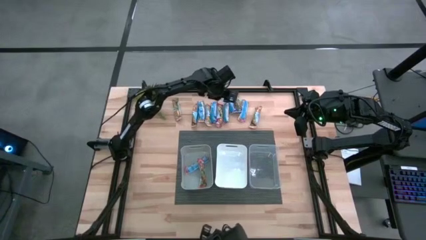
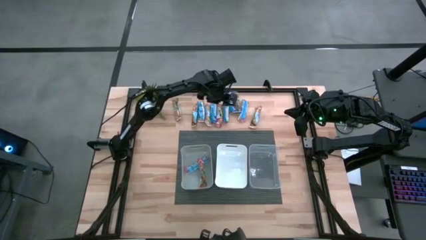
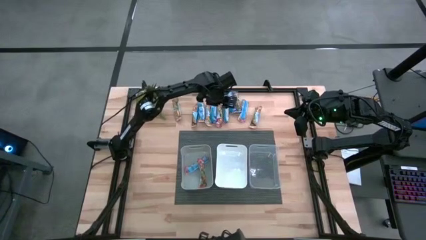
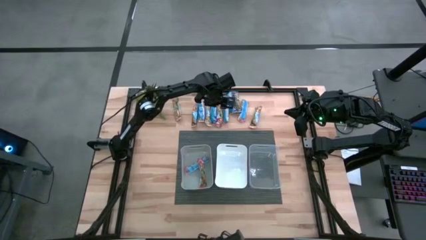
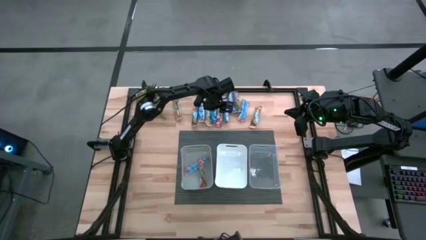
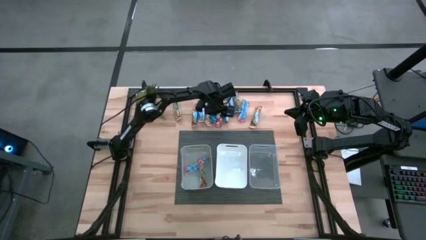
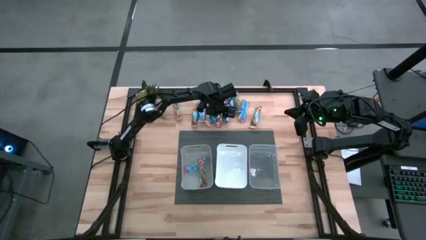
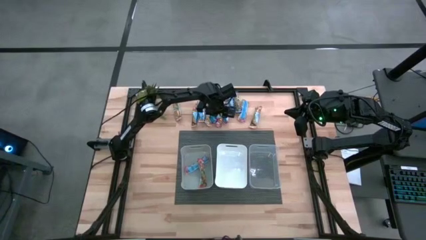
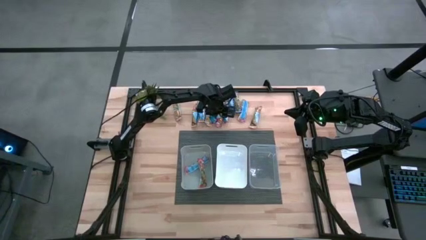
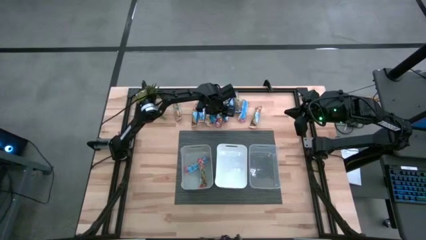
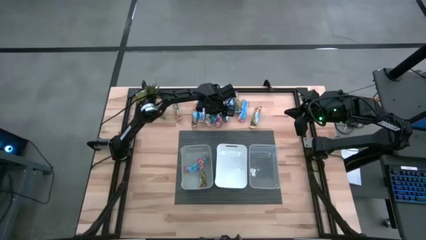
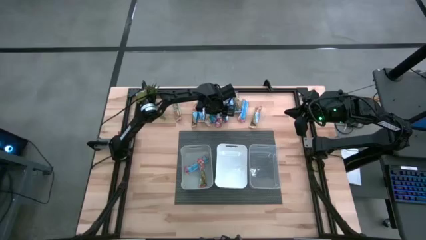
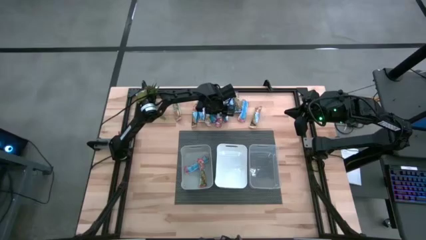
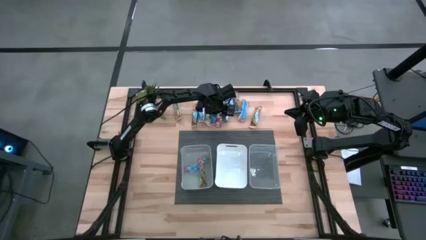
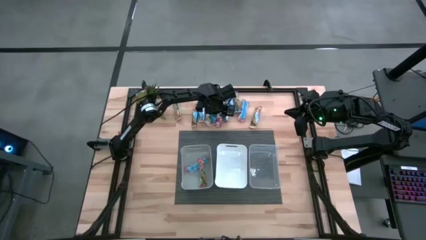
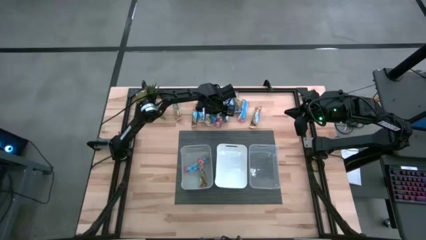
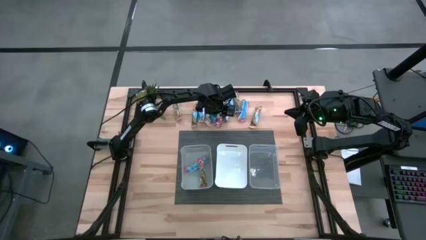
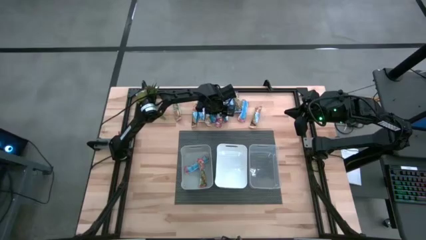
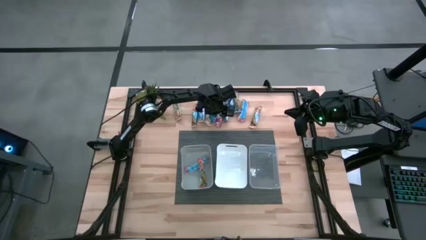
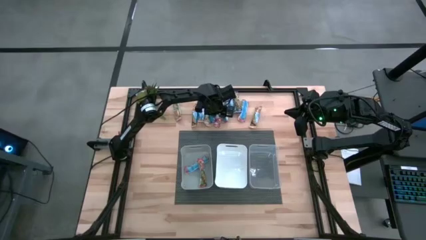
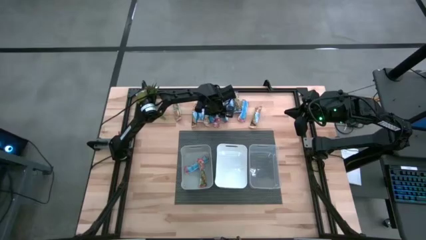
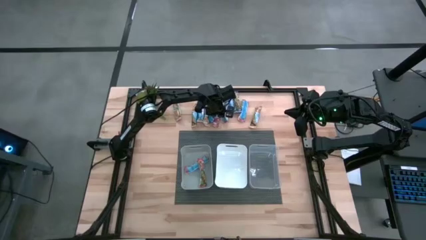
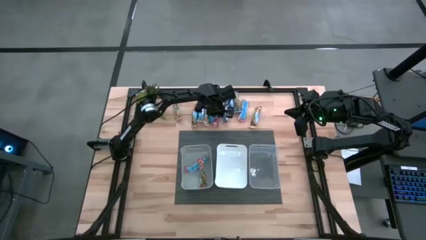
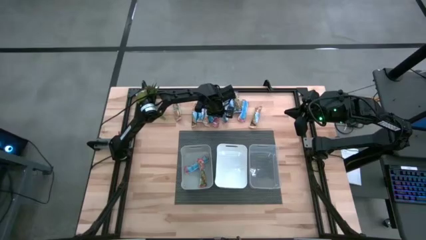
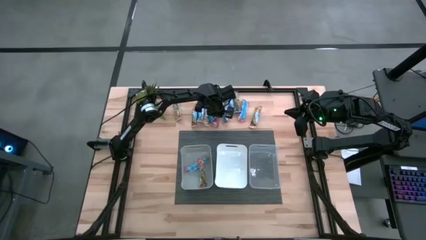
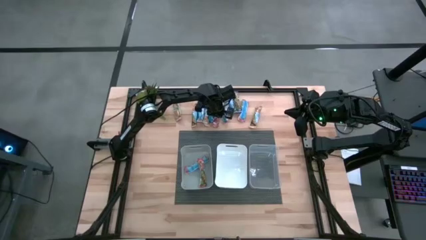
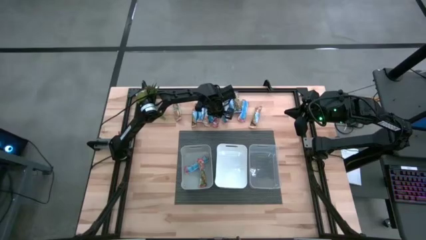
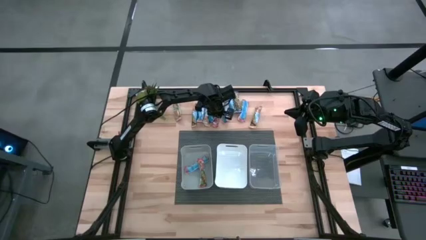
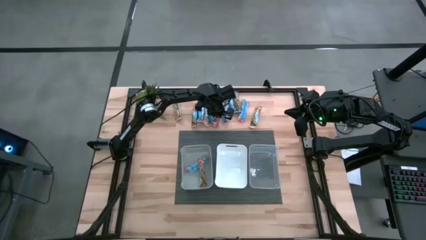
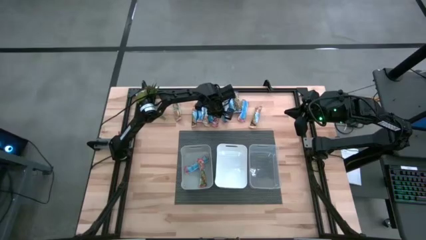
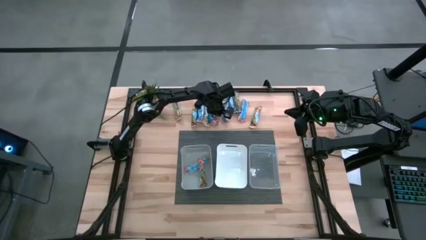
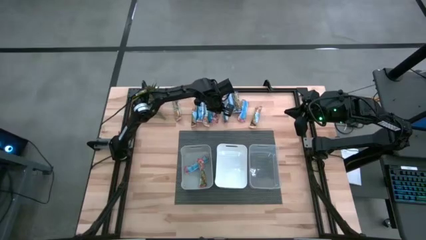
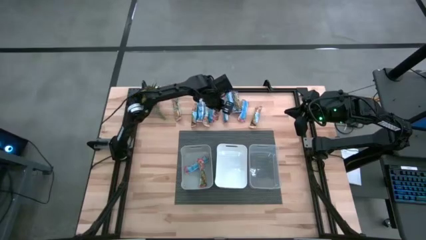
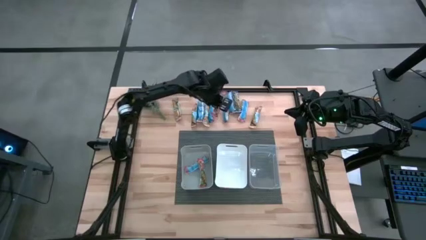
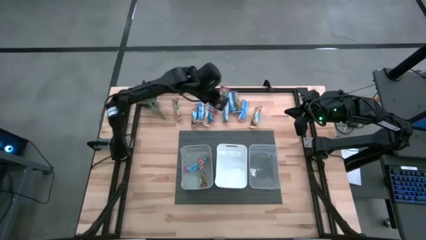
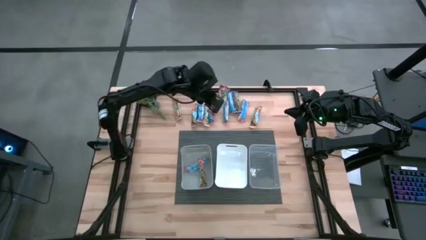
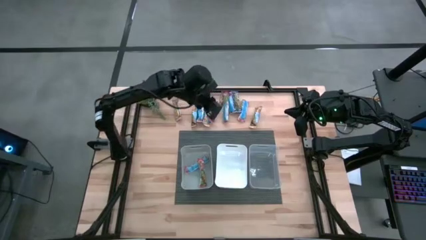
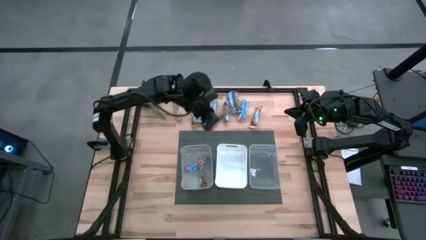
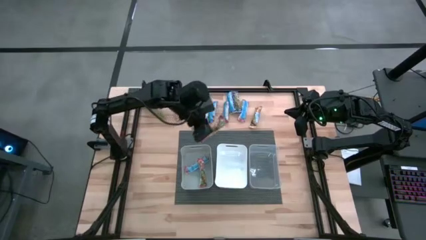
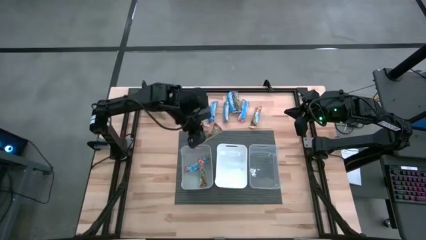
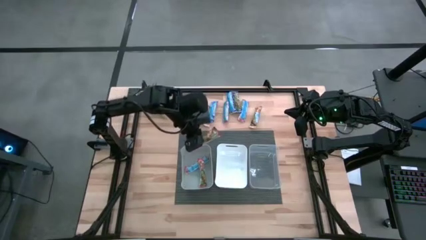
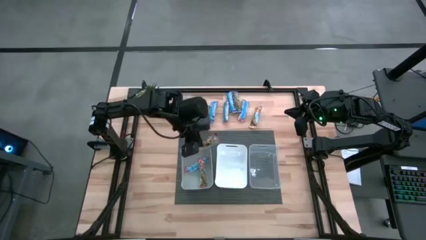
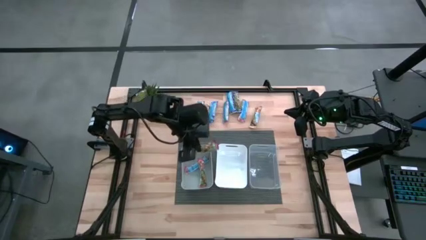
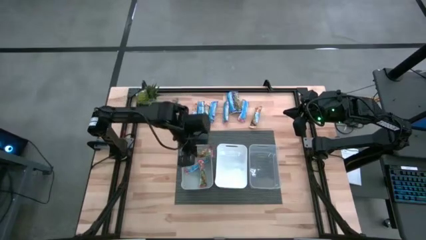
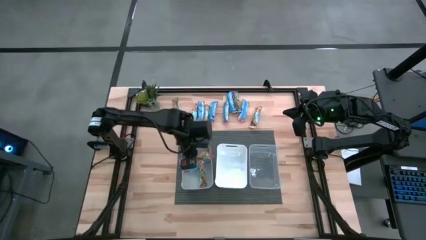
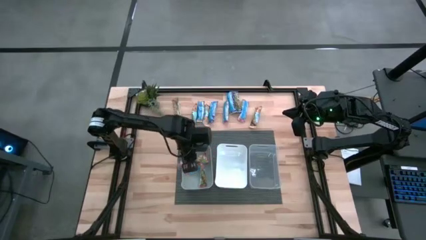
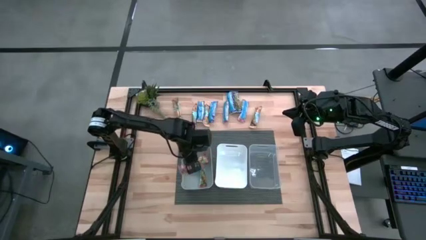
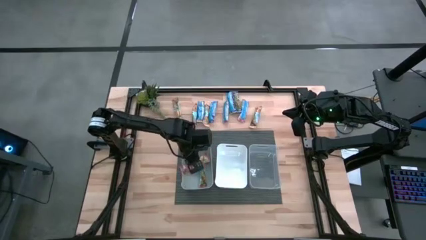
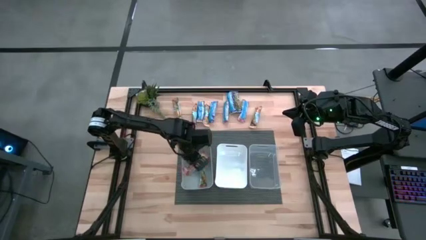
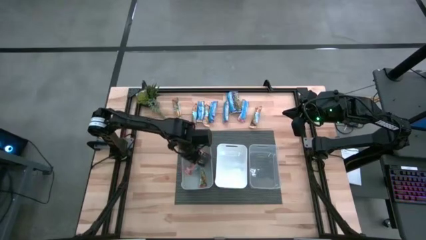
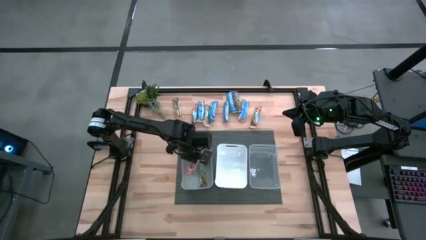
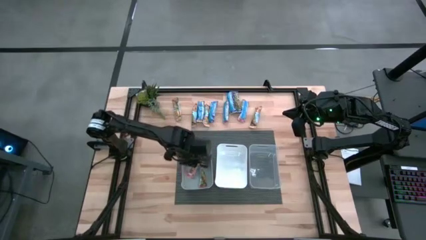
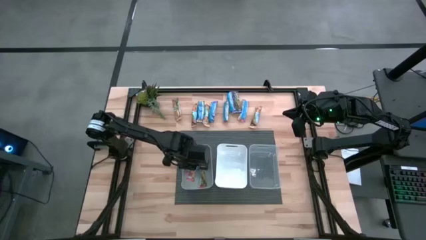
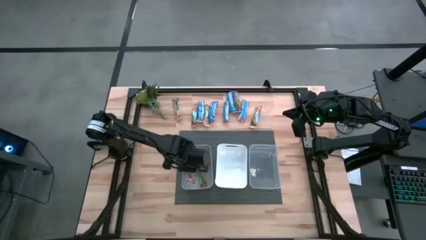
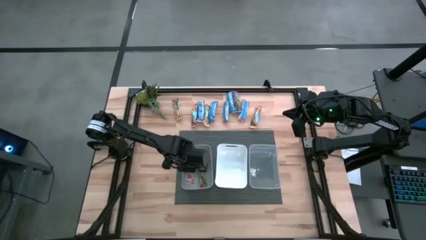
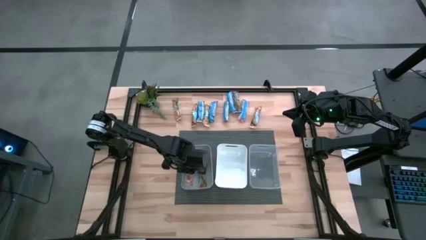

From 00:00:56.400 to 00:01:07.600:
Task: Pick and place Granola Bars by type
Put the red granola bar into the gray bin

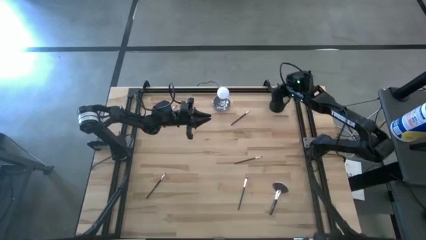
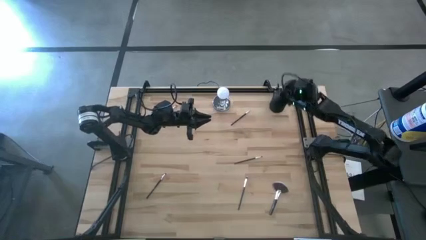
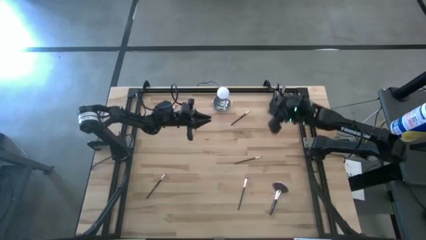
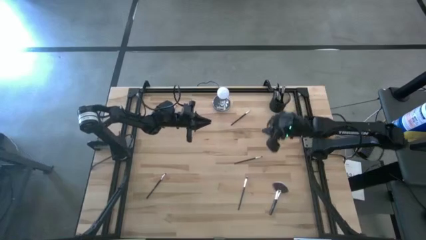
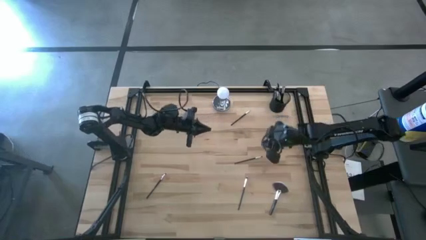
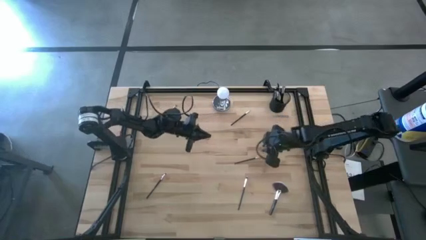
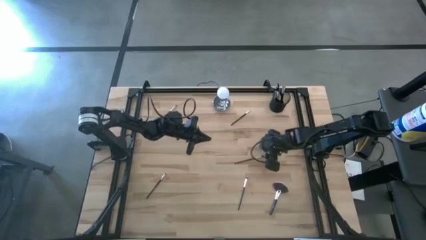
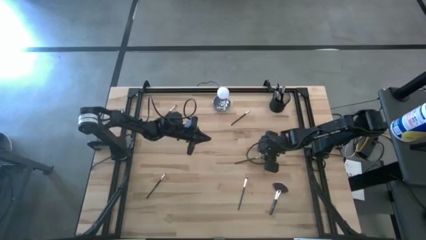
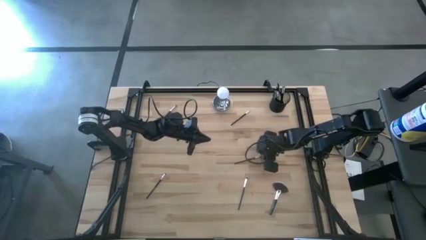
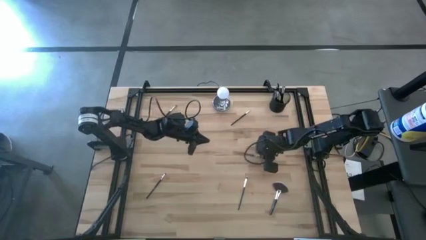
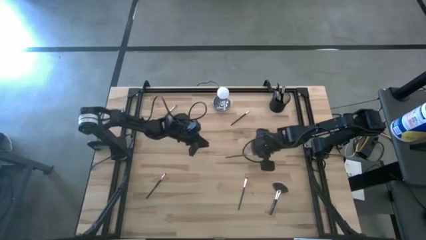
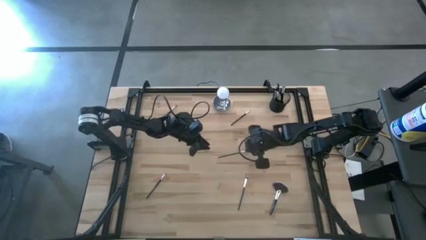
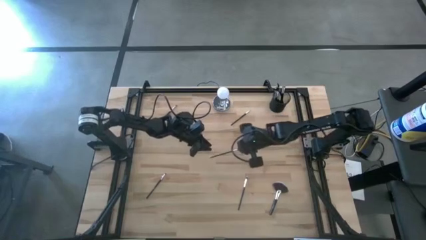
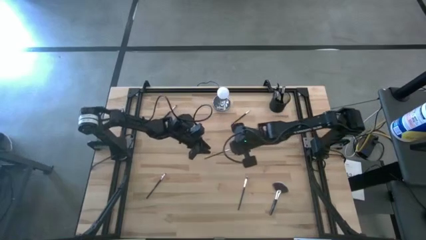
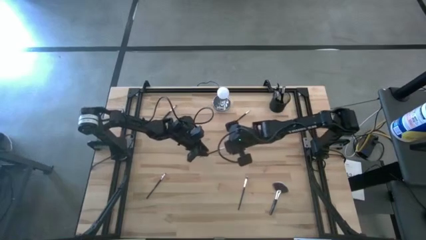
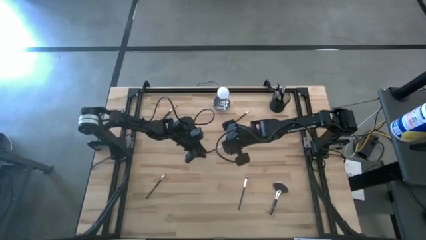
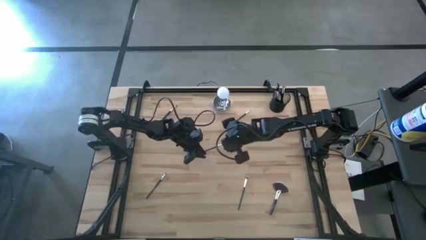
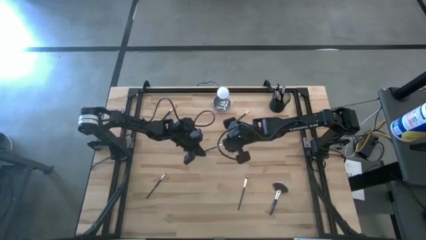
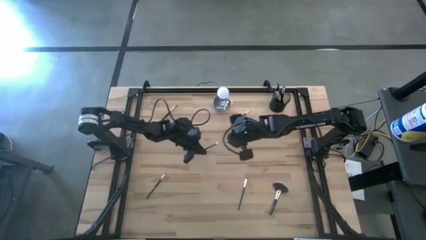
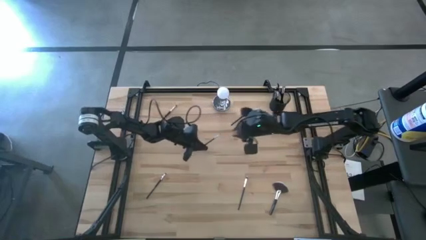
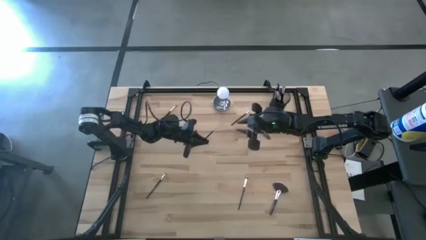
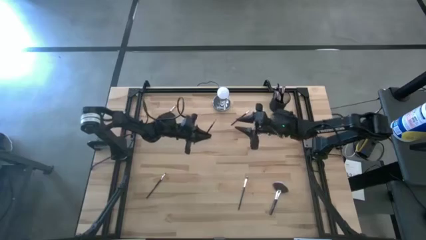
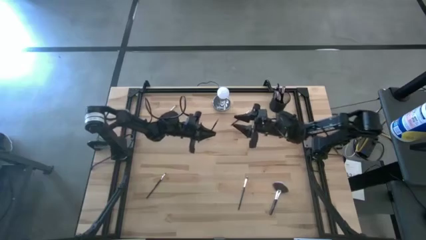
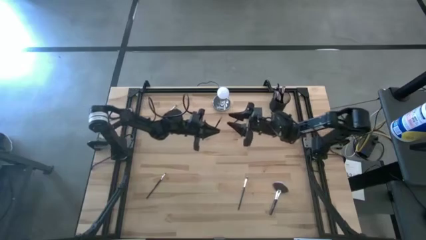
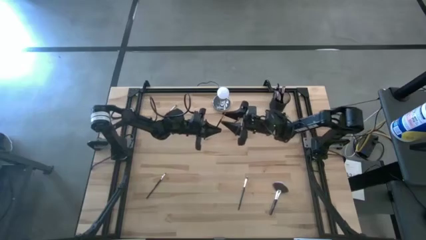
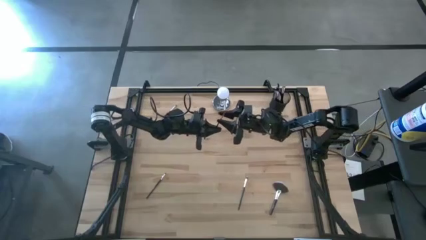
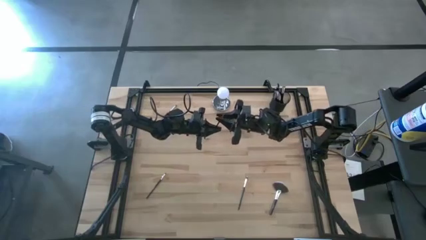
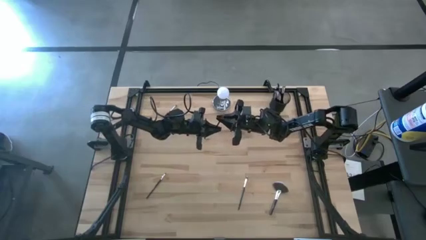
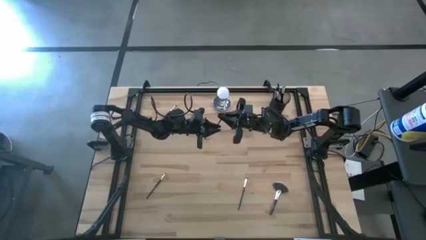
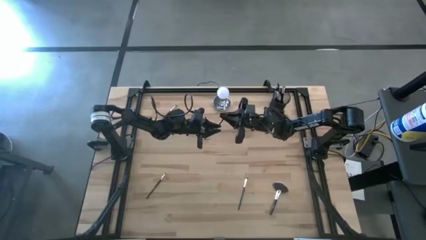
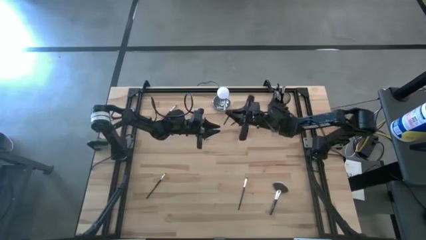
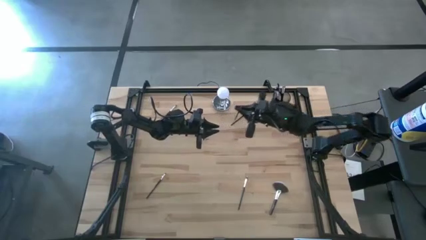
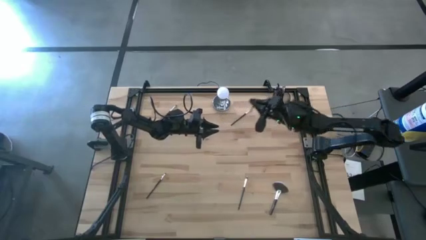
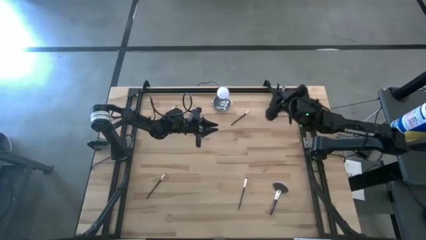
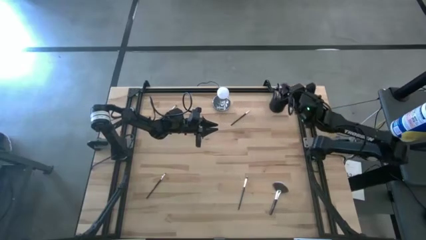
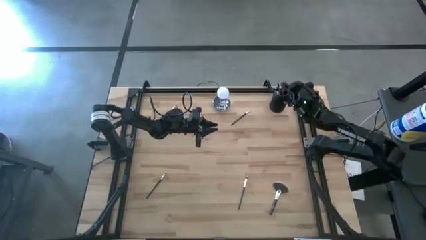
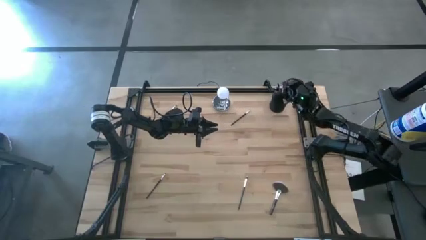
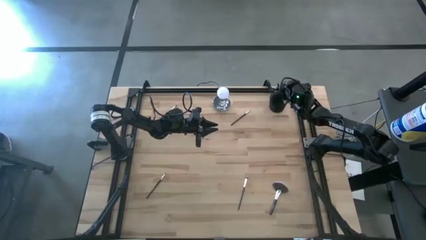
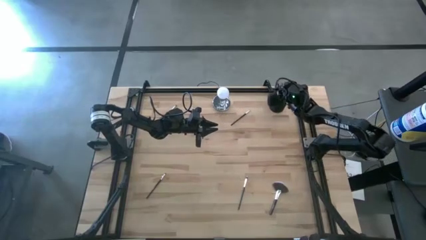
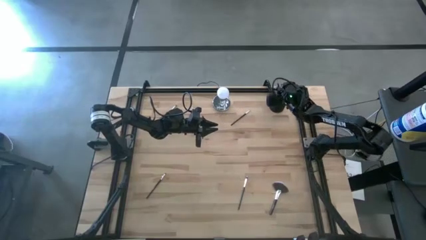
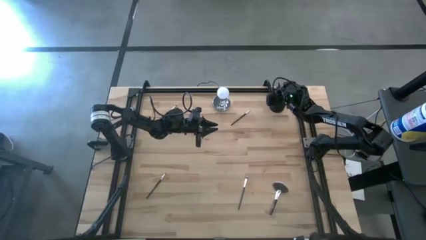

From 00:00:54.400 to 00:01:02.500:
Task: Put items in baskets/containers
Put the black eyeshadow brush into the black pen holder
